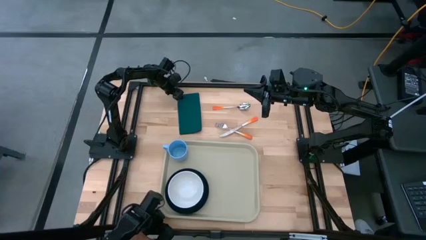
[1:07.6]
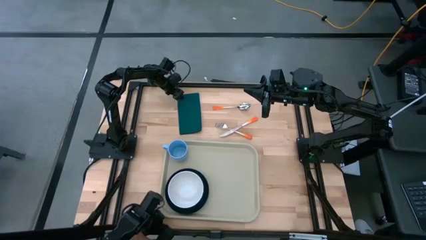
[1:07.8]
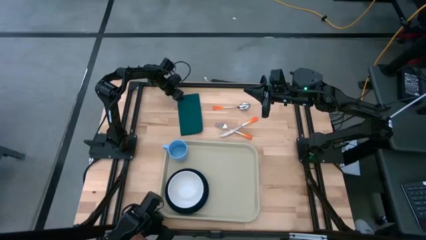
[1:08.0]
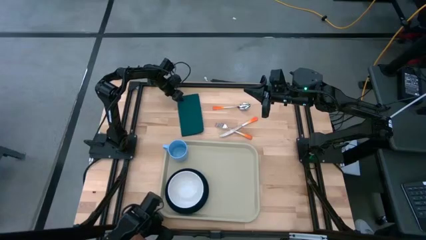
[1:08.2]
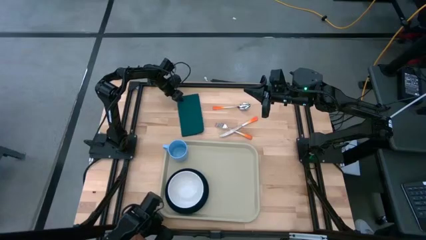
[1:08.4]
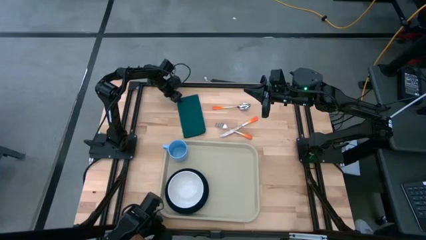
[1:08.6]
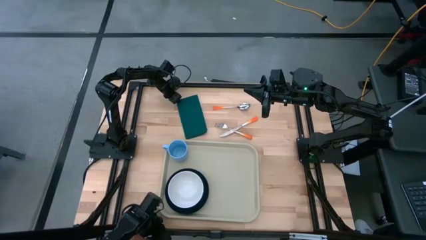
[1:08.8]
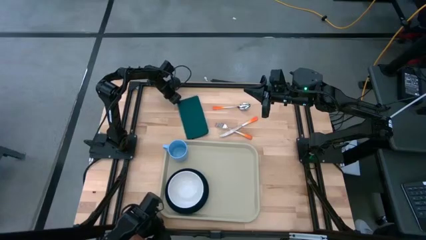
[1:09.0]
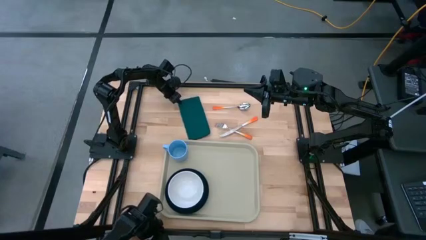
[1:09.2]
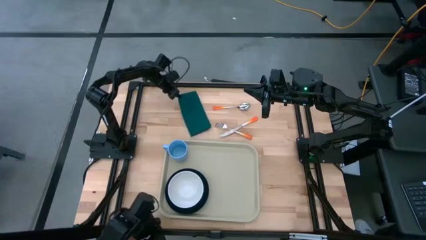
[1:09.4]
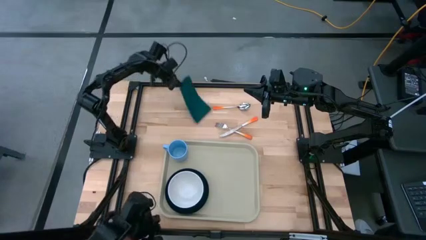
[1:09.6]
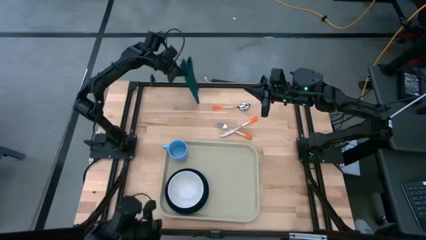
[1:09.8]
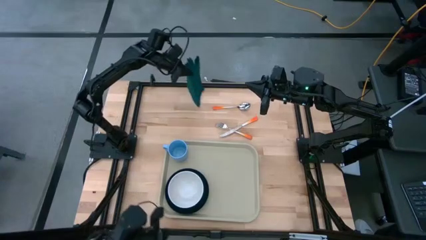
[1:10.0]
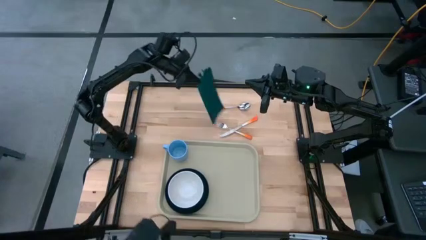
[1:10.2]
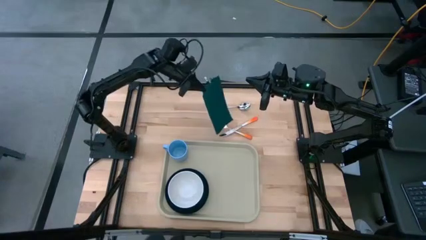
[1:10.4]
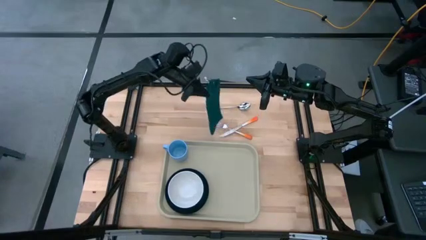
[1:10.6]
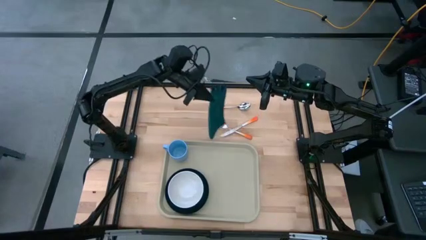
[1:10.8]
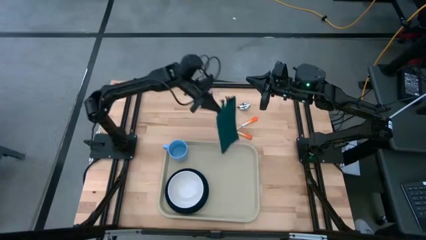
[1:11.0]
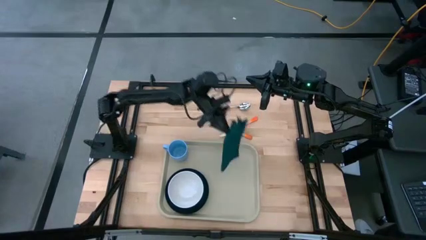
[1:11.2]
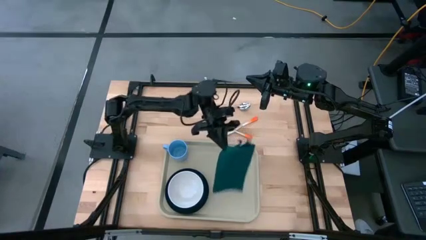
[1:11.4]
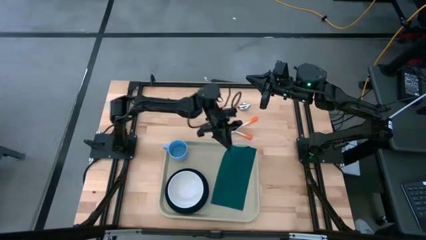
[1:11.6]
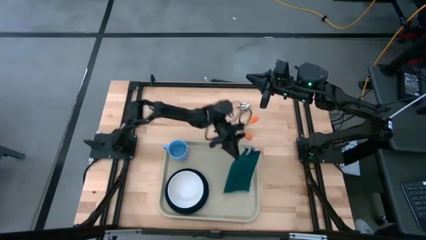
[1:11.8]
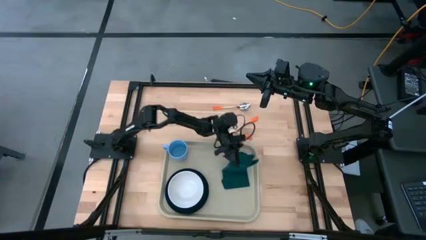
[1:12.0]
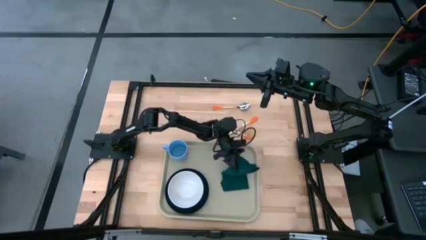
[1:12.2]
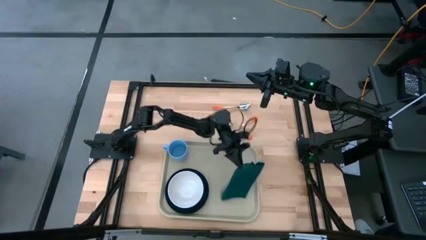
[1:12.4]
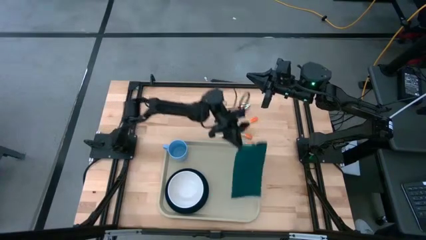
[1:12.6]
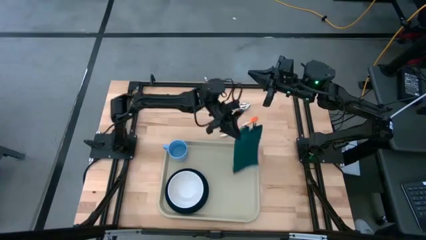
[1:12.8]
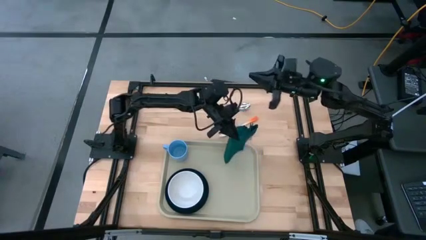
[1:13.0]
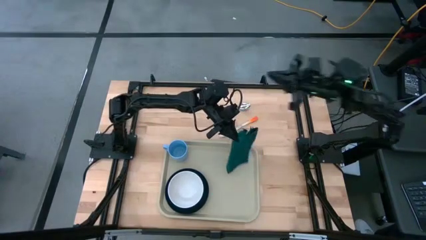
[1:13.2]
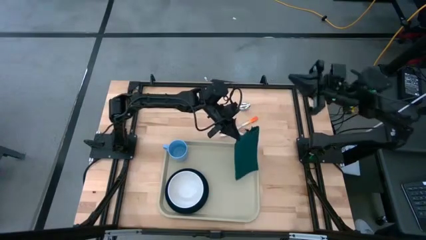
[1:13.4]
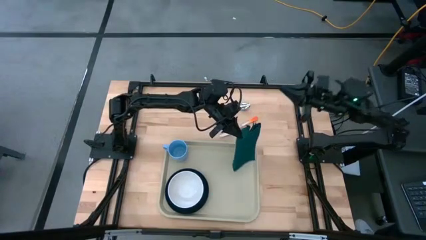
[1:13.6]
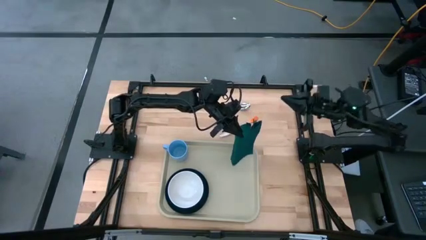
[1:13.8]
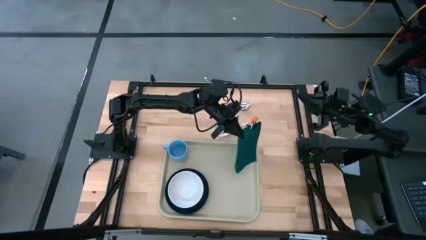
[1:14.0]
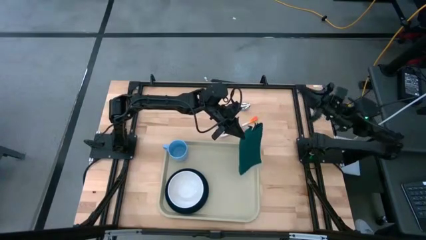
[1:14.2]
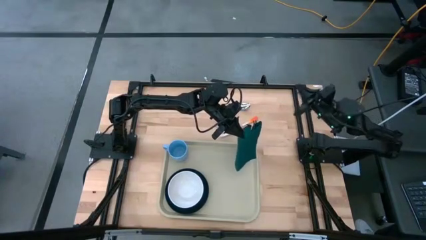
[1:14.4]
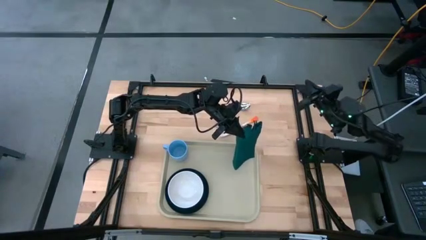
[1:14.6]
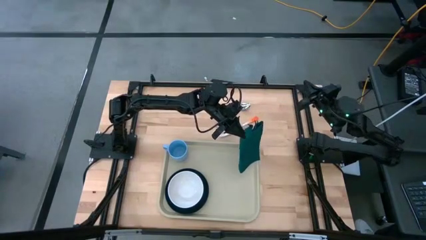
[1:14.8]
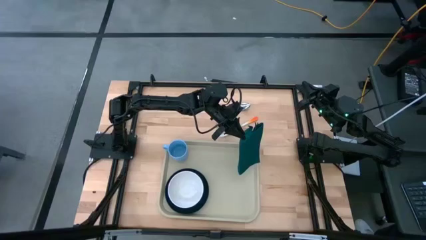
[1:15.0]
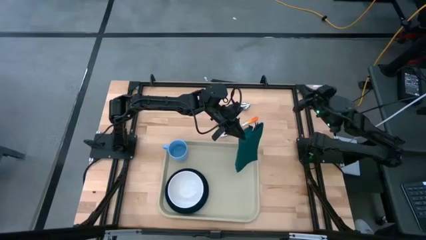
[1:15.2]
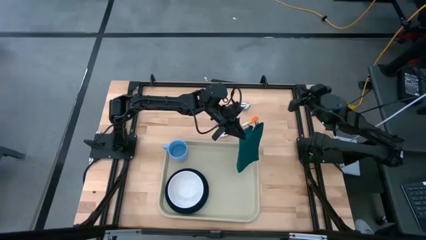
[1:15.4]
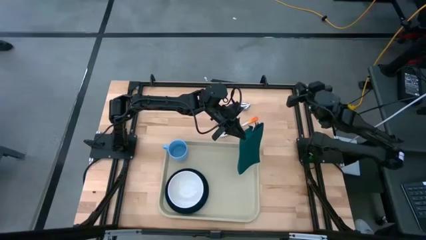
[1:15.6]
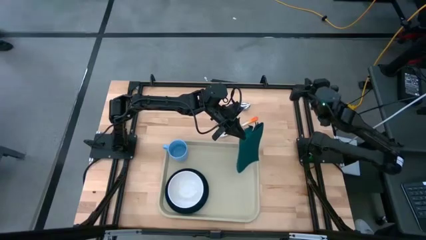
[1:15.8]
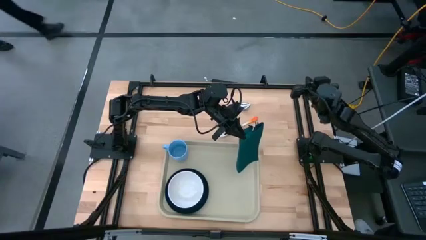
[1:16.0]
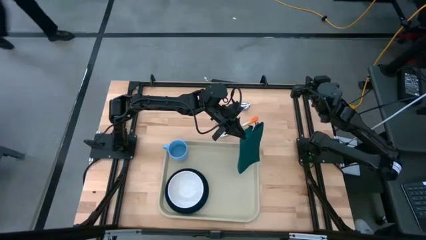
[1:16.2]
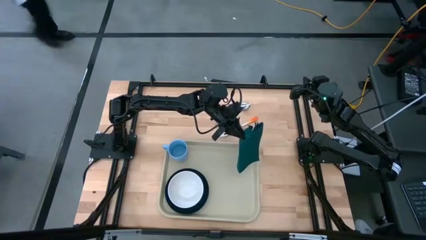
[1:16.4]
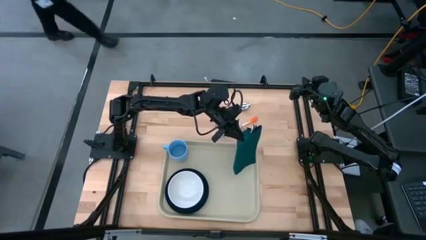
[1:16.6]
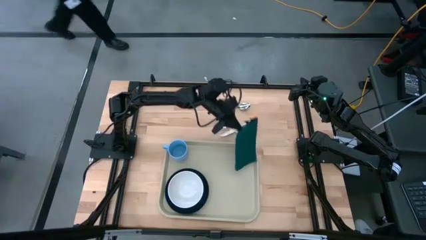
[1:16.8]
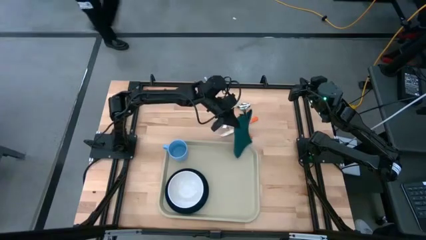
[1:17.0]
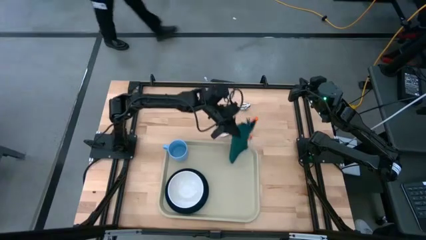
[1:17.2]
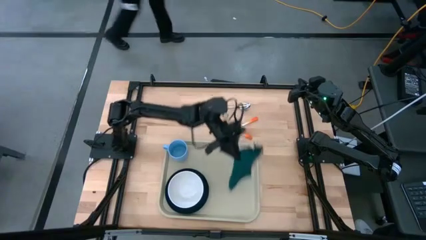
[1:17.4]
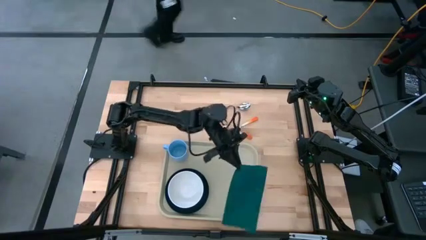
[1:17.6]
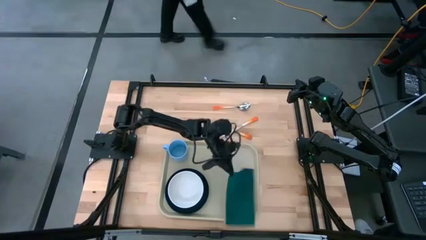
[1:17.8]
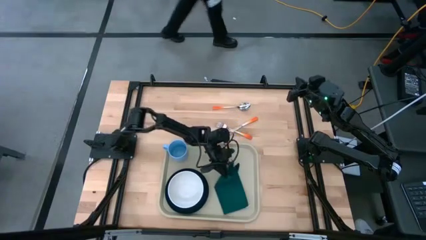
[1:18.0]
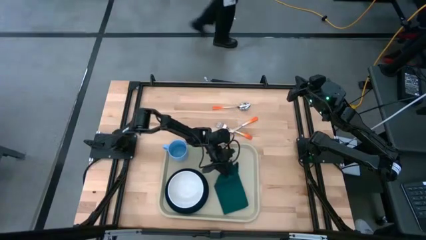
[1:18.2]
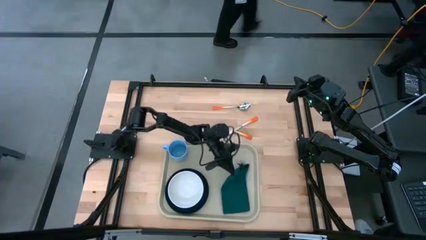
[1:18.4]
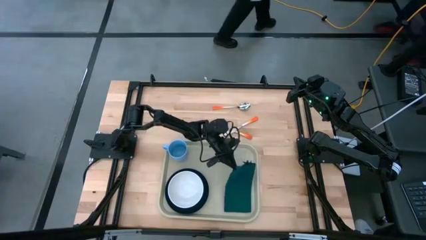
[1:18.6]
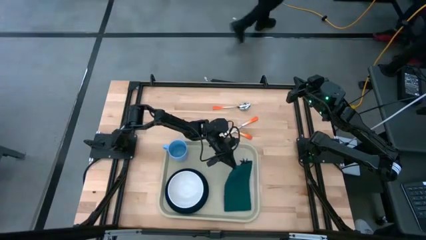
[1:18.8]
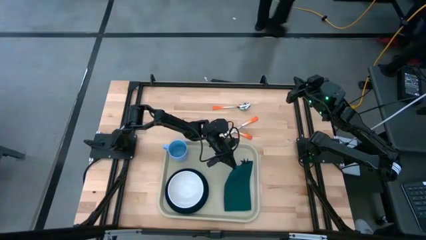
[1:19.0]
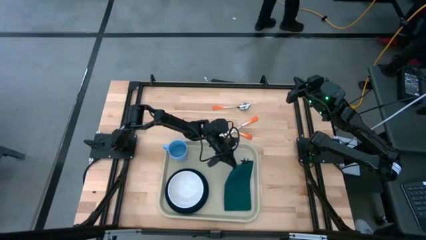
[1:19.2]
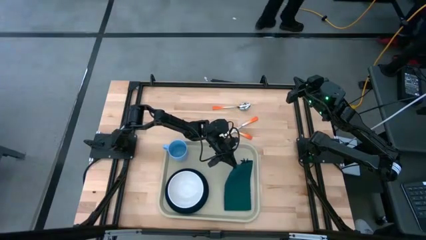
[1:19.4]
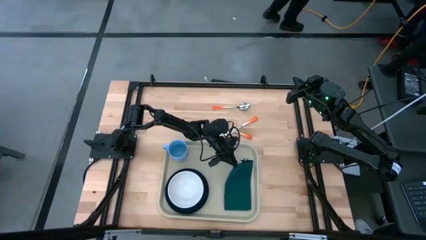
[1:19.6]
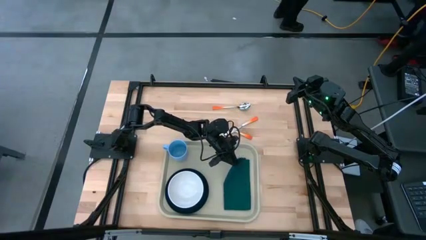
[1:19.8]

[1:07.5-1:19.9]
Task: Set up tray
Put the green napkin on the gray tray to the right of the green plate

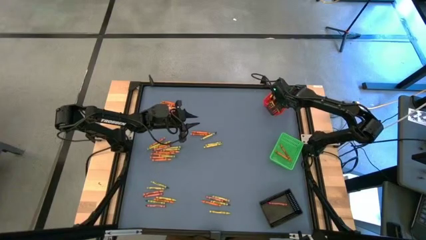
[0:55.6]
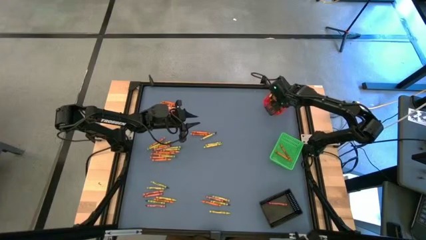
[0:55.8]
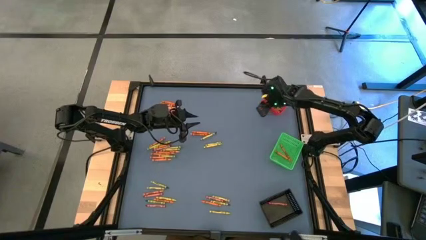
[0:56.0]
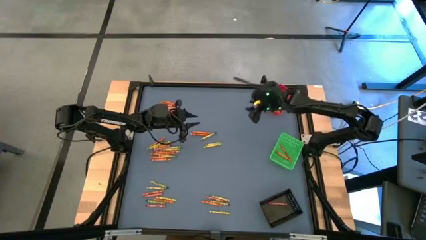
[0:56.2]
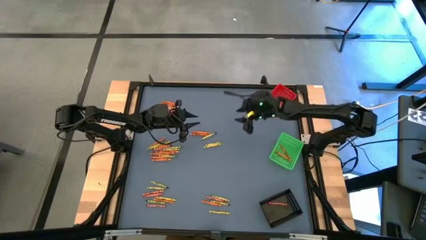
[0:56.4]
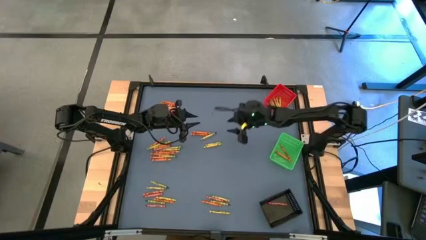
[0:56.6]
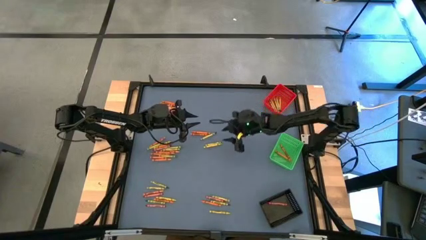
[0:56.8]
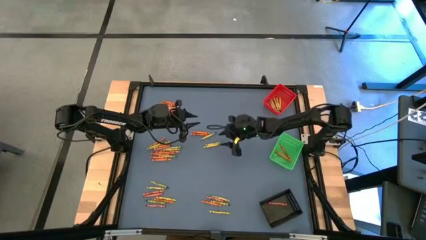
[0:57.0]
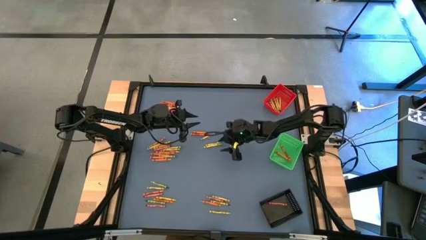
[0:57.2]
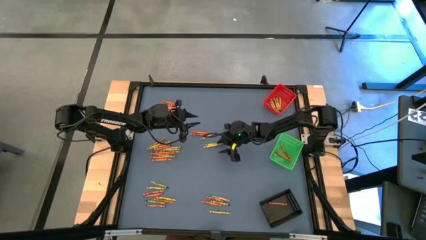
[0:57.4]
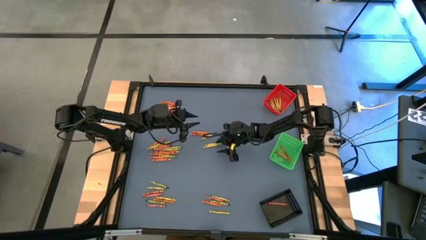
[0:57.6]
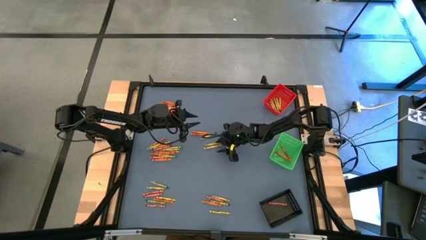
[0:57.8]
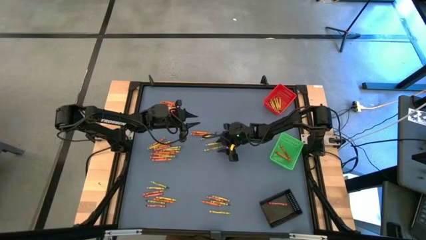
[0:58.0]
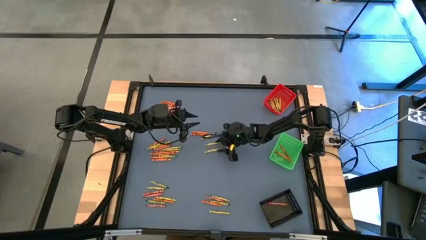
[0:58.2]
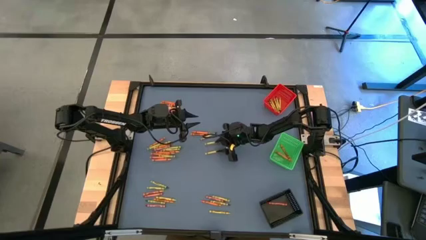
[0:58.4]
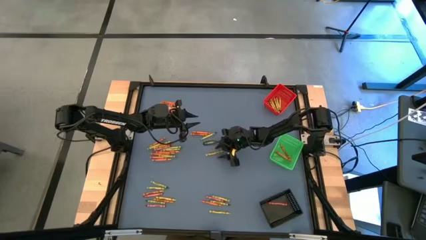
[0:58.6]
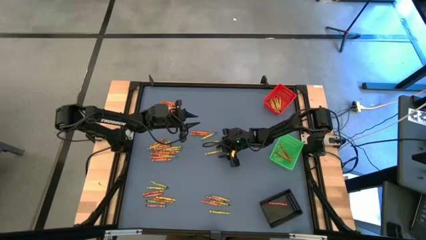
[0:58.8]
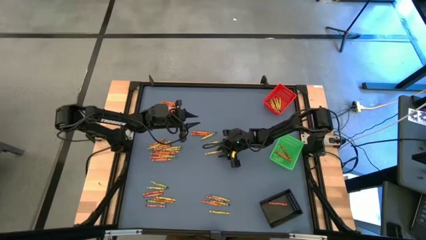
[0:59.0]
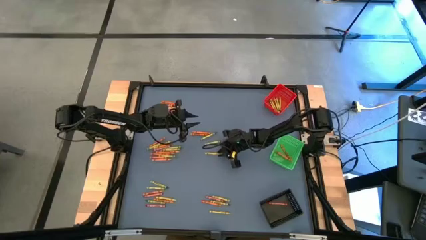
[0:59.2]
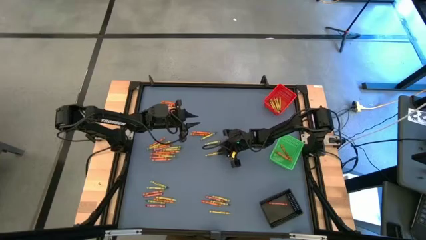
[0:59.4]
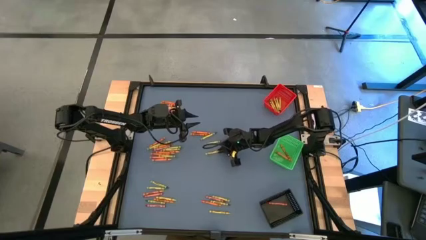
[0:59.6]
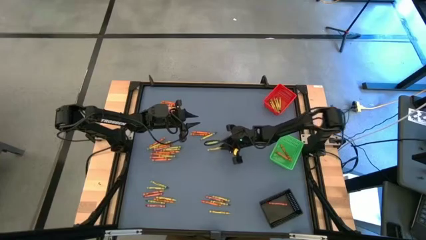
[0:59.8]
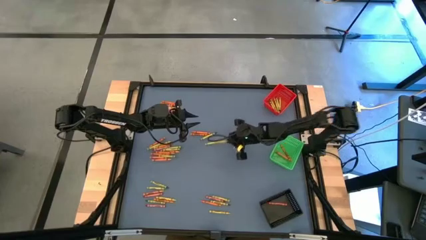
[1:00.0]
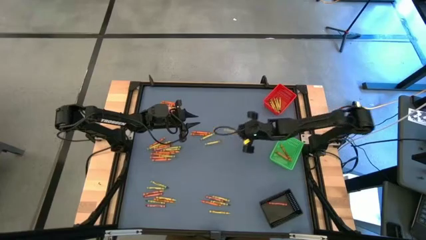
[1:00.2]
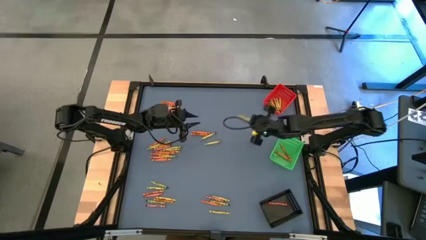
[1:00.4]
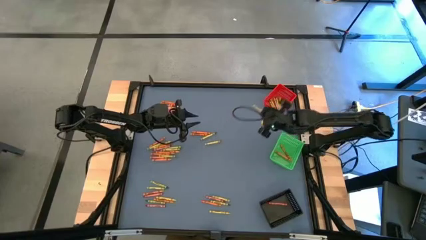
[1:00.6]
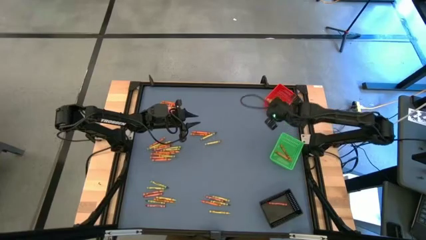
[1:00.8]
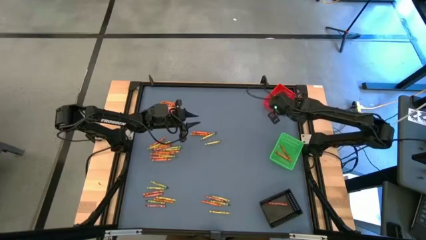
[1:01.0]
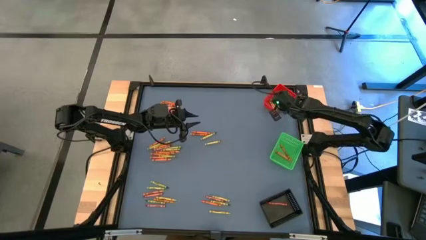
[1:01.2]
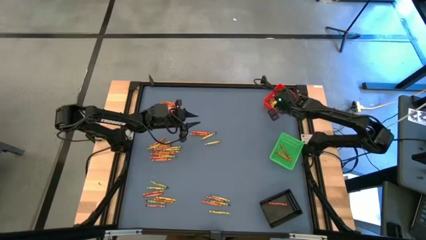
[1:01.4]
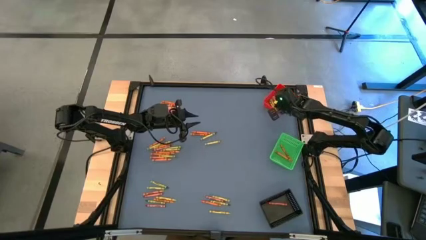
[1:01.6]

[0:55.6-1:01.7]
Task: Sort crayons
Put the light green crayon into the red bin
